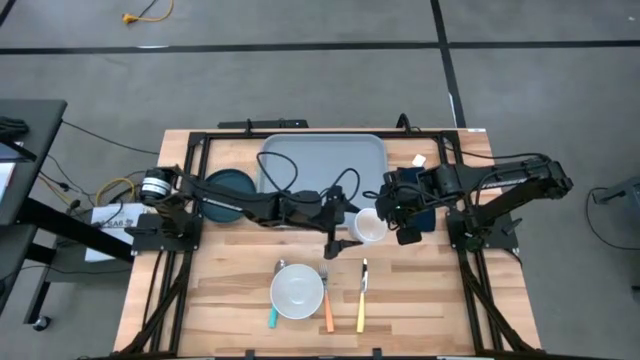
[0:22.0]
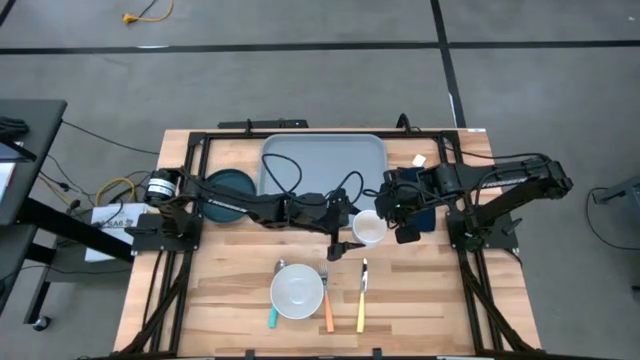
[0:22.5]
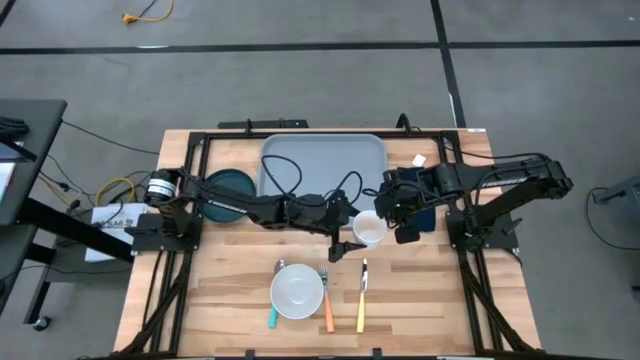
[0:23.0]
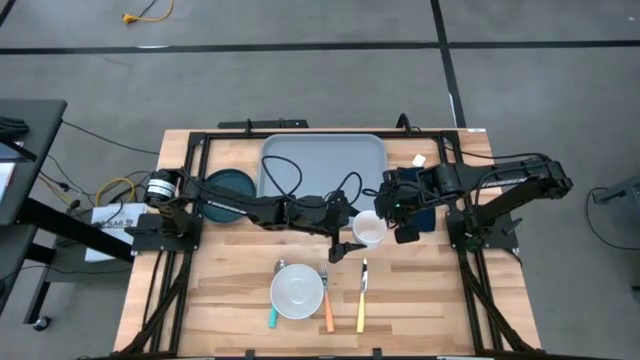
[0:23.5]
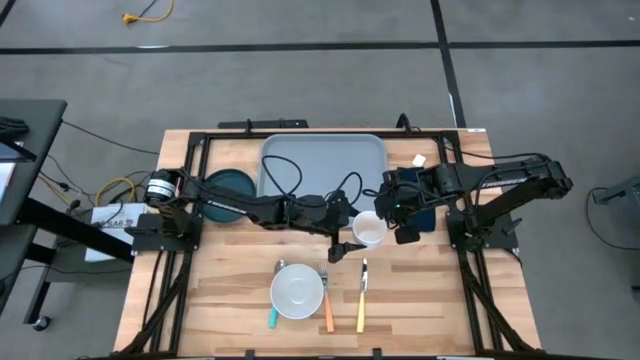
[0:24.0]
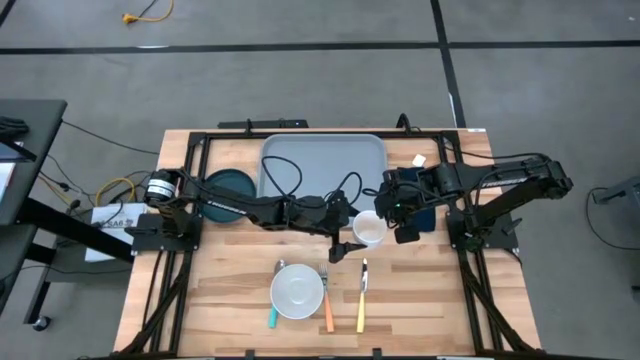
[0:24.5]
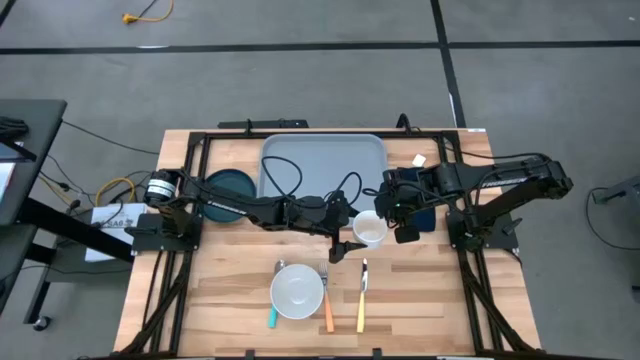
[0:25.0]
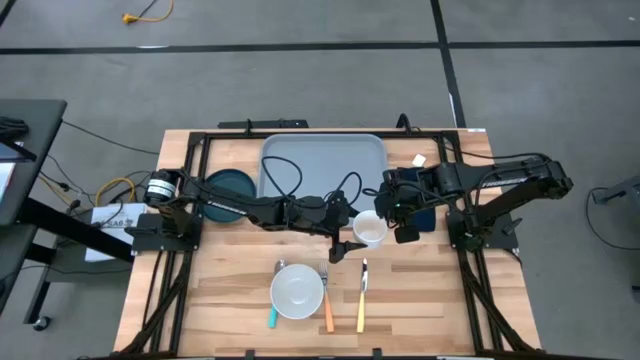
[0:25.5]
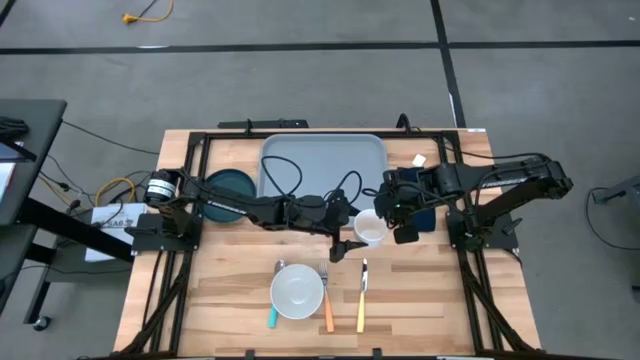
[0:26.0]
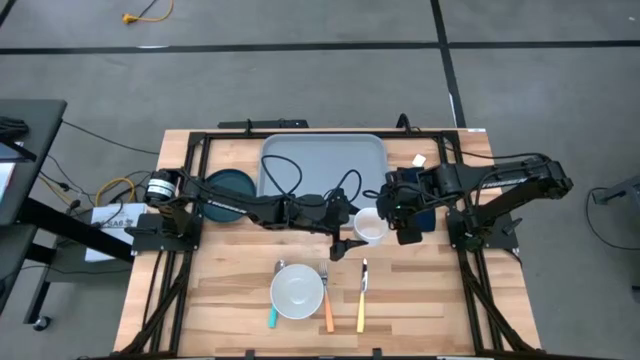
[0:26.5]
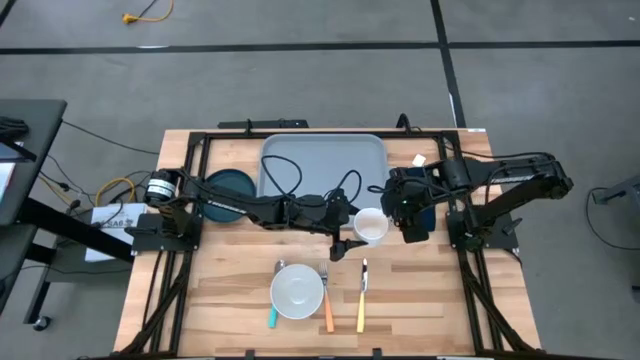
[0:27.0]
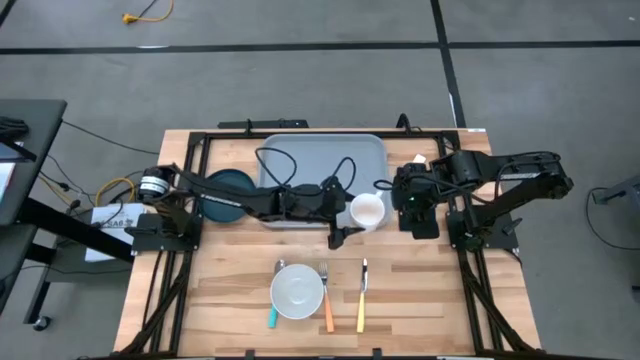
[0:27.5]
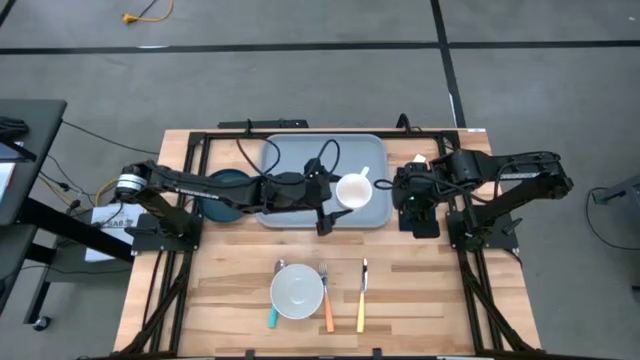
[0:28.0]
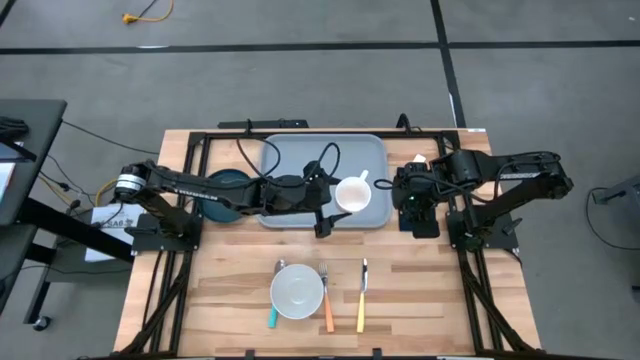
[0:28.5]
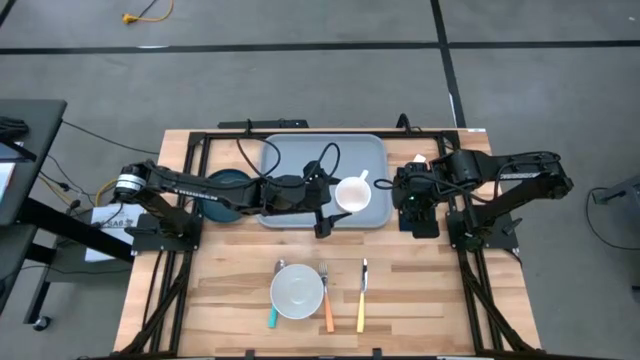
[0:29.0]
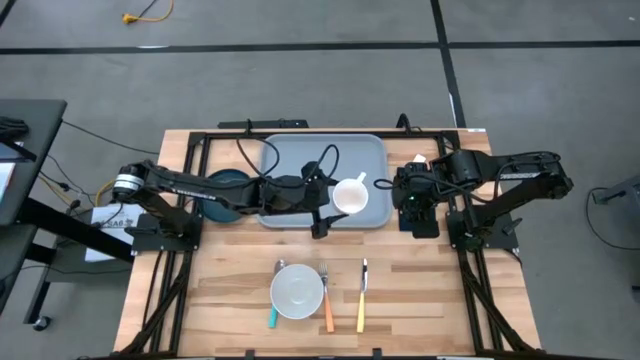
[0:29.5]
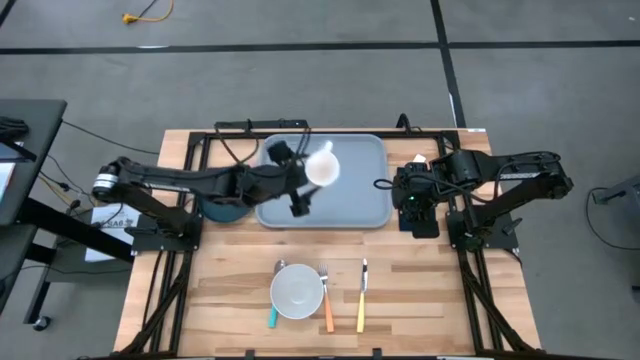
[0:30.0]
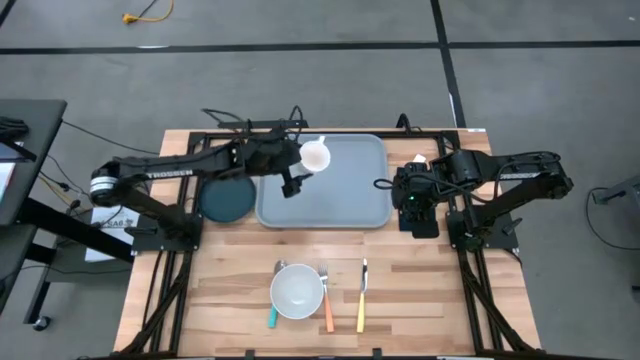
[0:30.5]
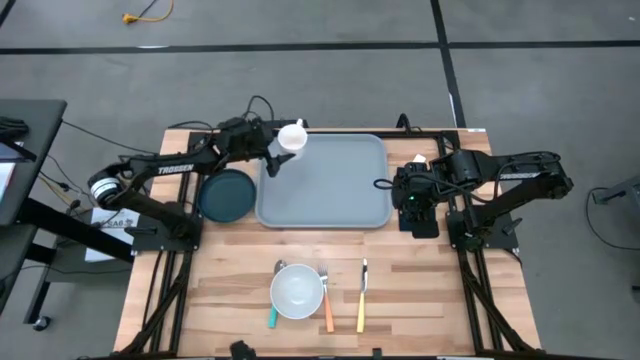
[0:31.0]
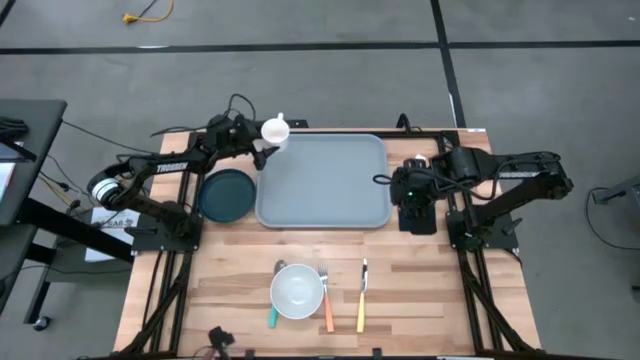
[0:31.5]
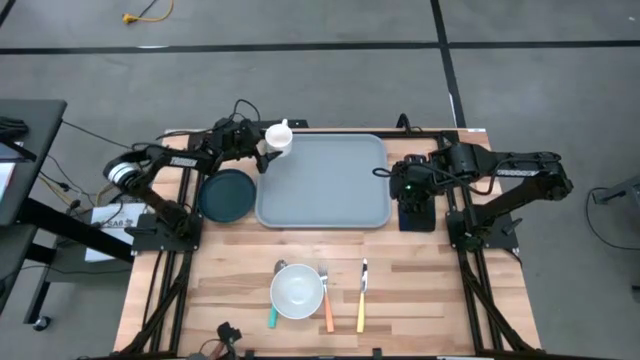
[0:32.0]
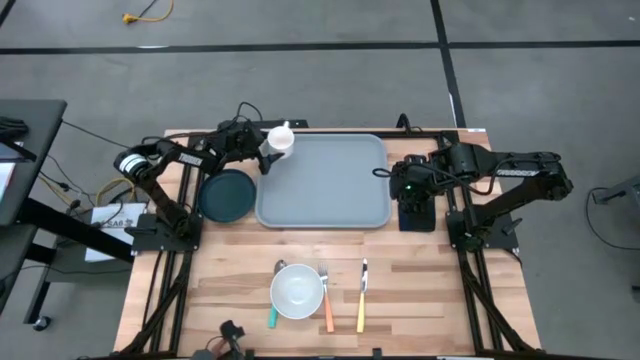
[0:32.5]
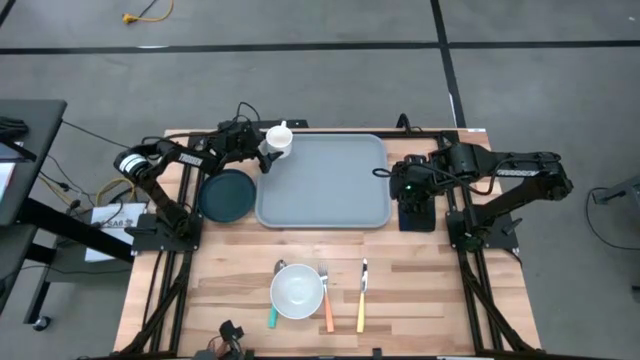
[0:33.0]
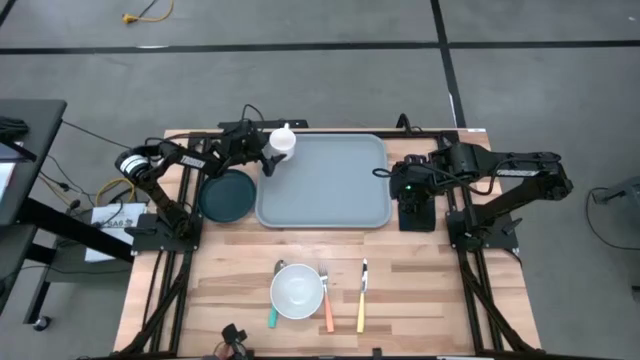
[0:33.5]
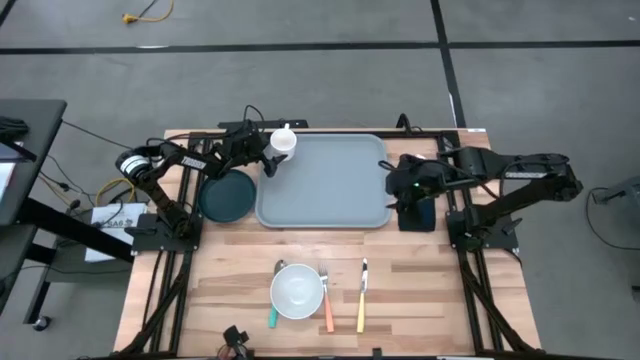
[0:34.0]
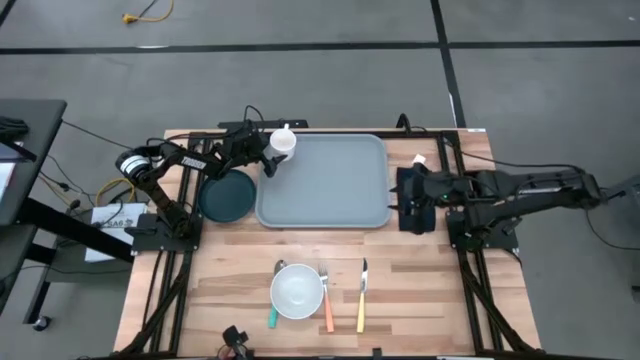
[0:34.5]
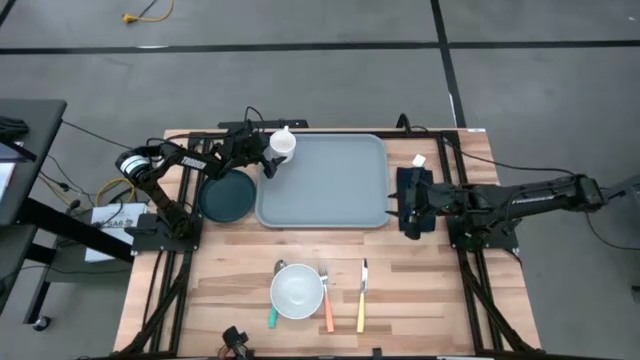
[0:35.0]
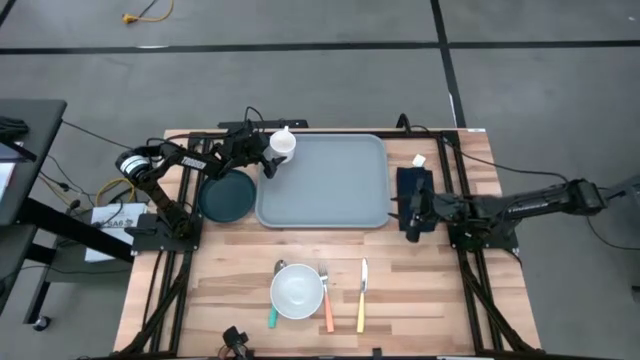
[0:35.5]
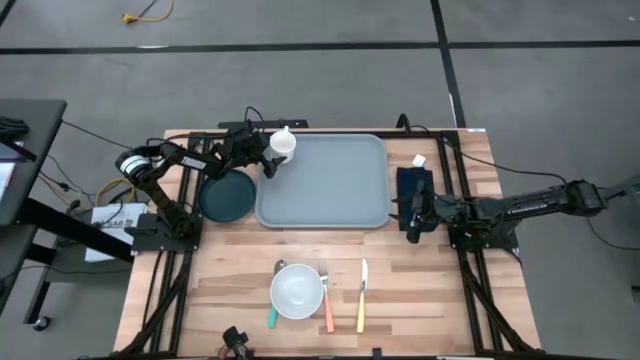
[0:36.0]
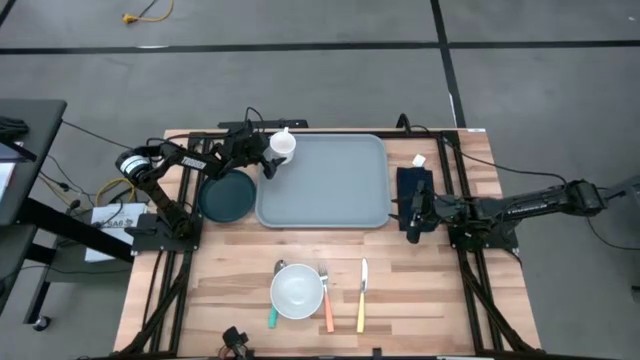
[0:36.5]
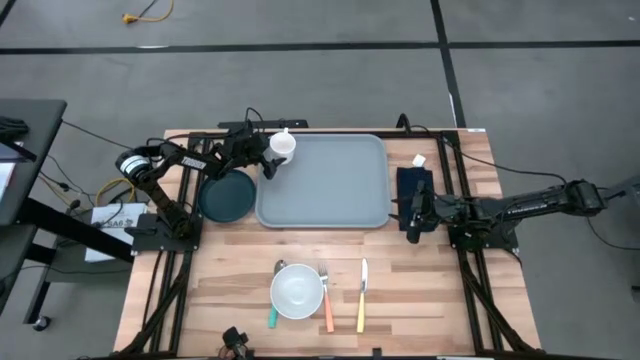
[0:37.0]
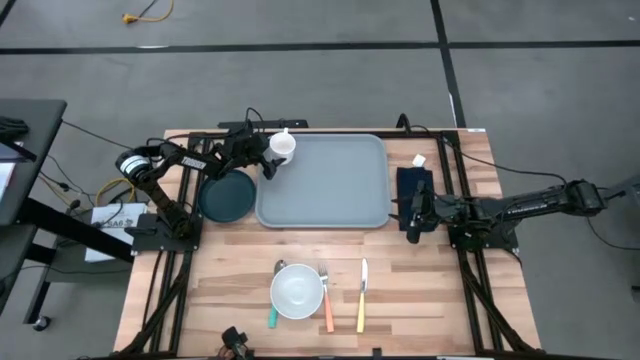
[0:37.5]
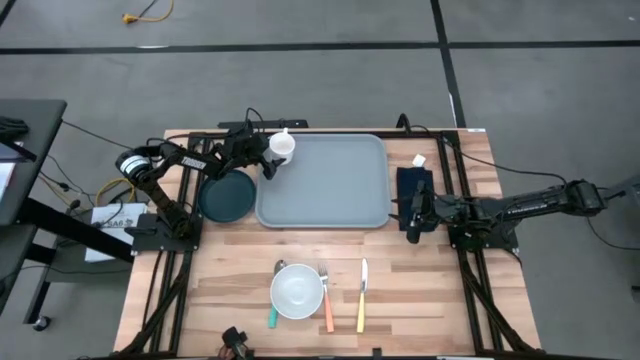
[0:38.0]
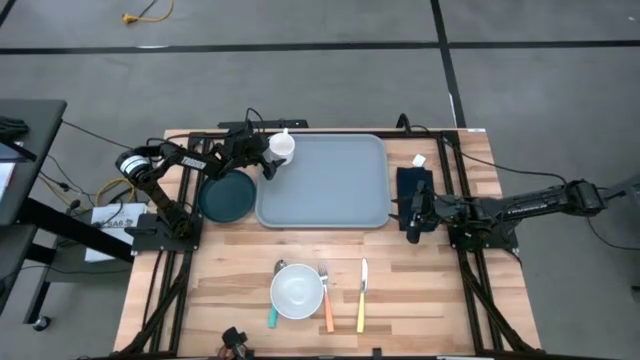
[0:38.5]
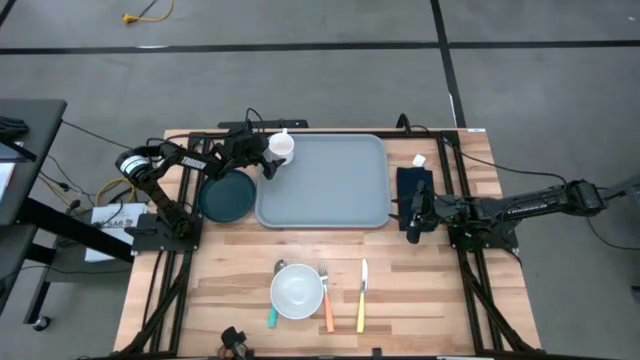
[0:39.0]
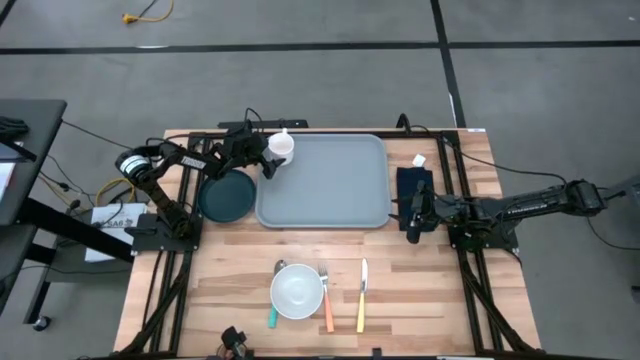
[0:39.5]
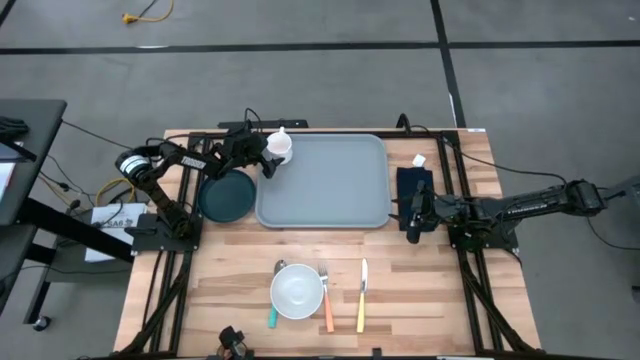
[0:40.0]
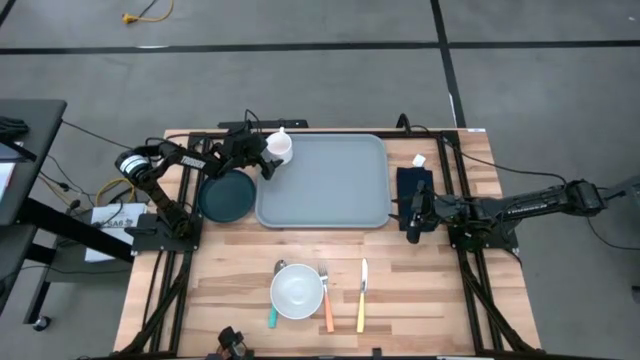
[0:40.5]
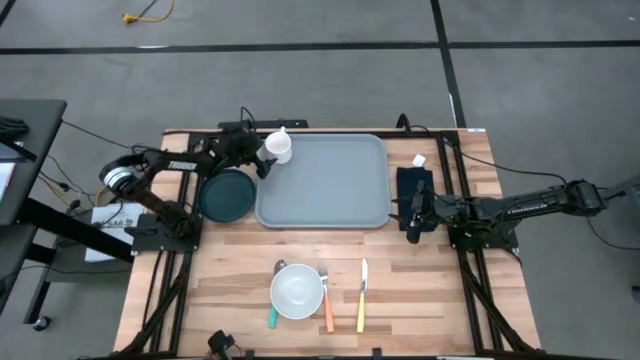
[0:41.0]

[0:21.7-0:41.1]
Task: Set up tray
Put the white mug on the gray serving tray

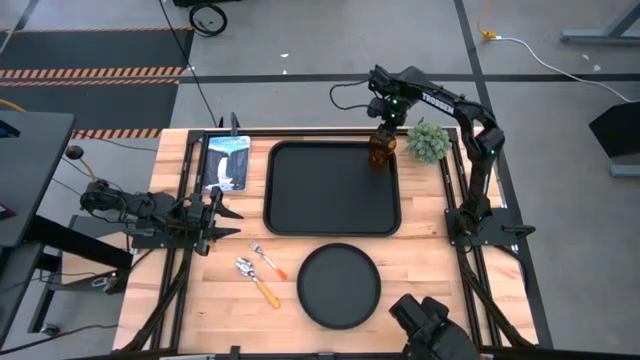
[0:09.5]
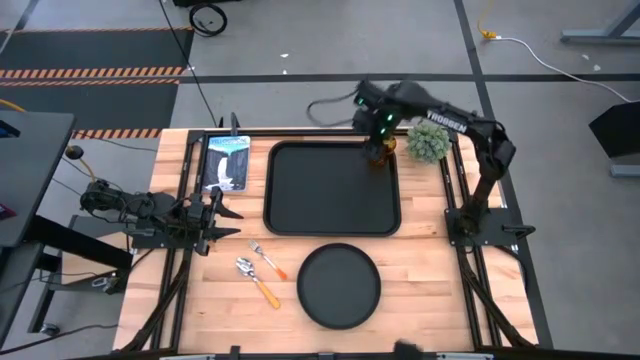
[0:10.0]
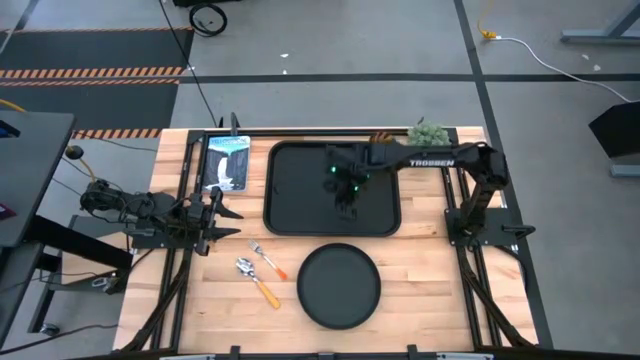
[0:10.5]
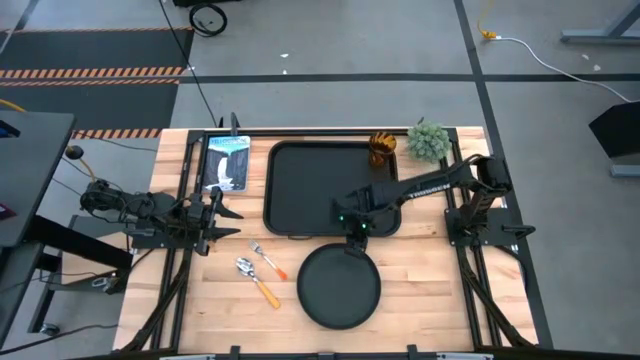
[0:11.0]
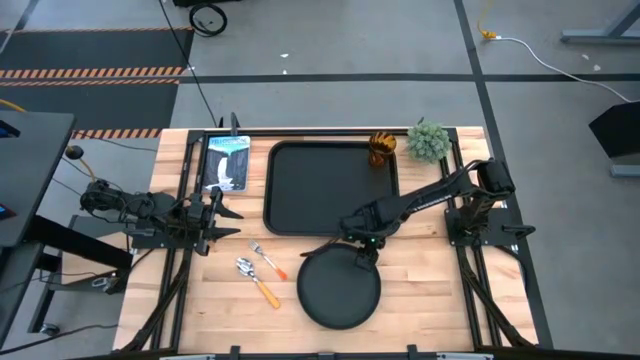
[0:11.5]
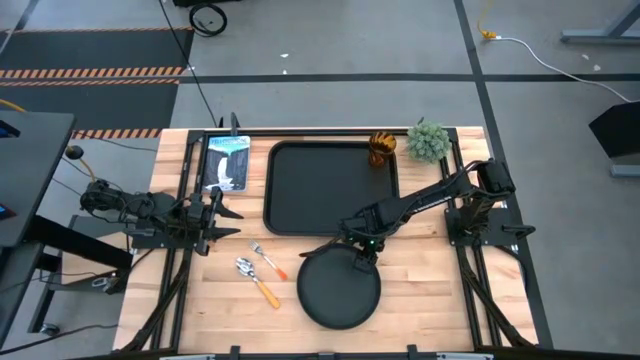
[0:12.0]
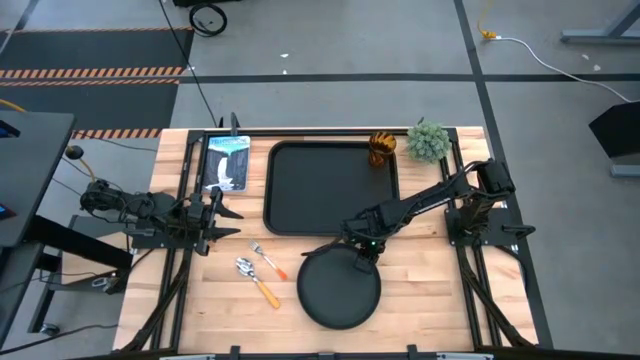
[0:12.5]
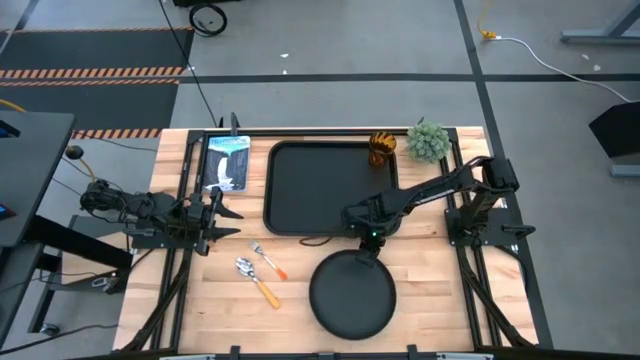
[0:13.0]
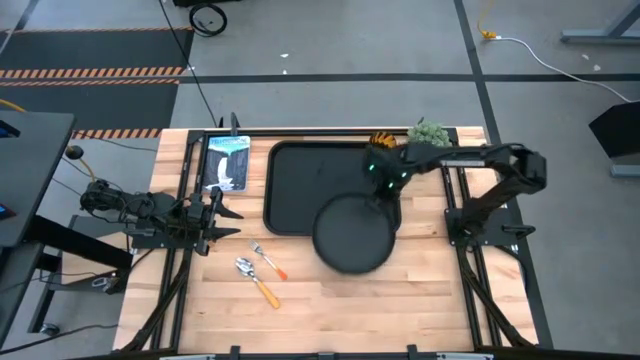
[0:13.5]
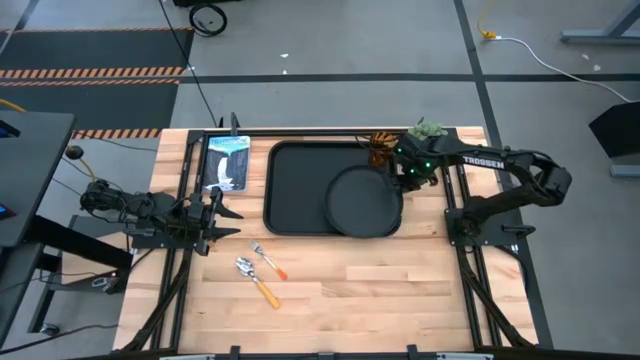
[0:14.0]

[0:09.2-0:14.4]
Task: Pick and place plate/cup/fork/spoon on tray
Put the black plate on the black serving tray below the brown cup
